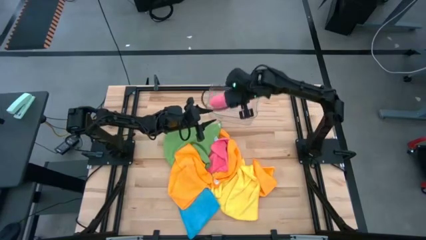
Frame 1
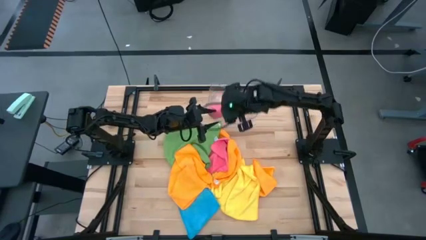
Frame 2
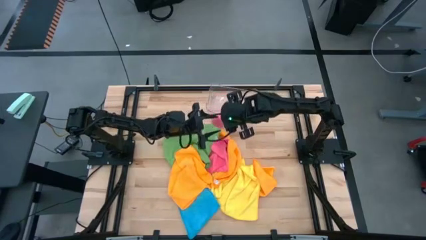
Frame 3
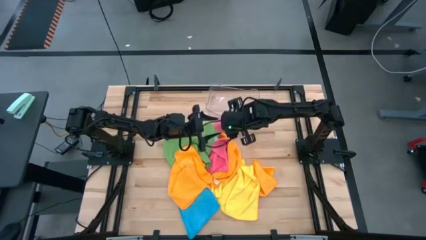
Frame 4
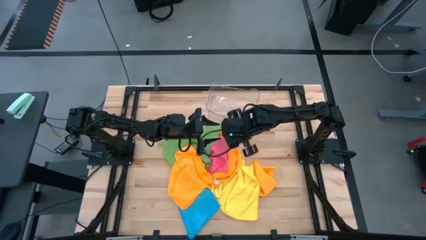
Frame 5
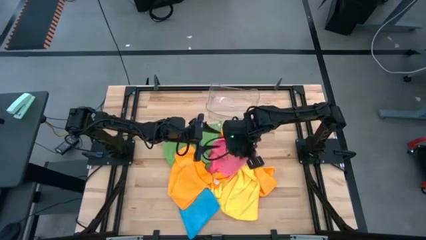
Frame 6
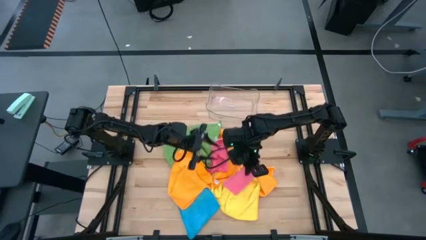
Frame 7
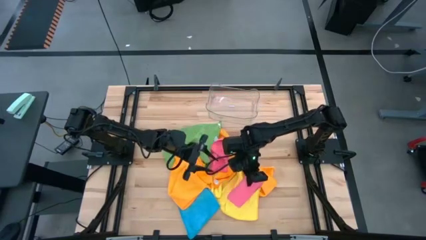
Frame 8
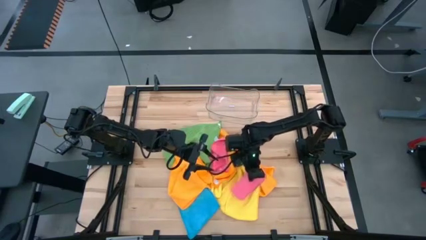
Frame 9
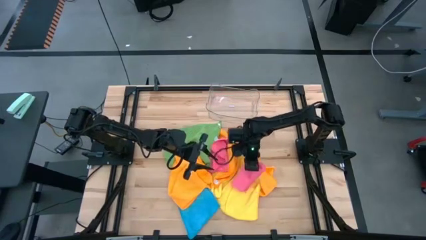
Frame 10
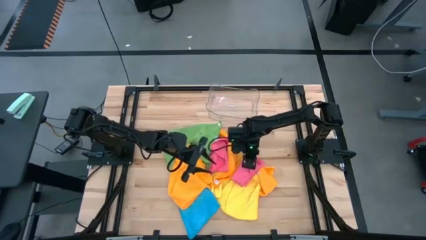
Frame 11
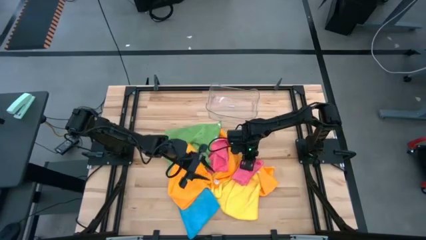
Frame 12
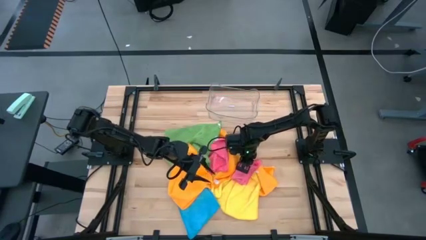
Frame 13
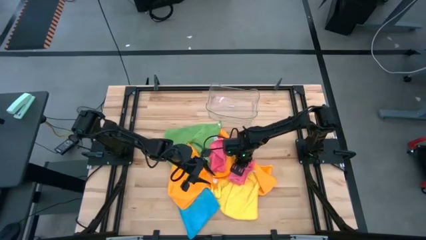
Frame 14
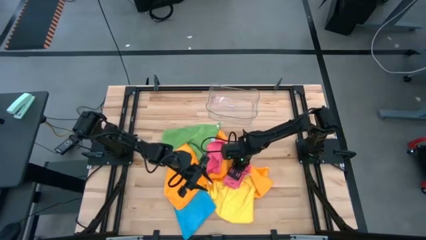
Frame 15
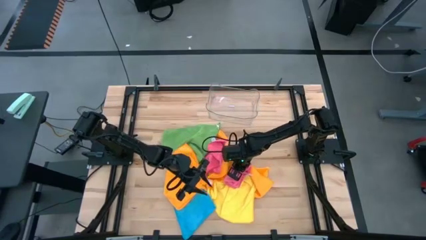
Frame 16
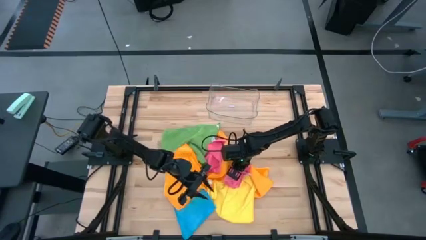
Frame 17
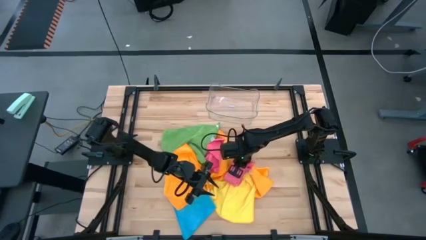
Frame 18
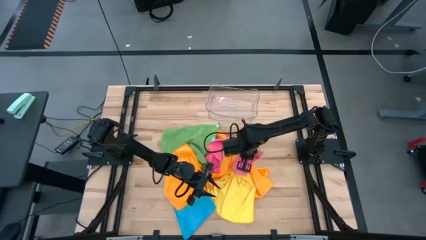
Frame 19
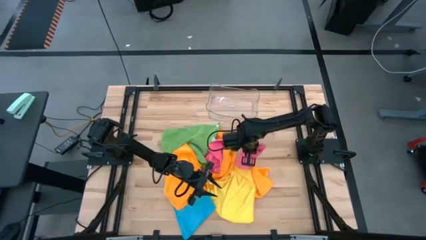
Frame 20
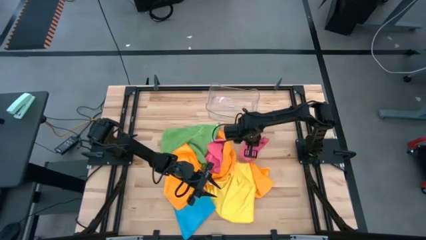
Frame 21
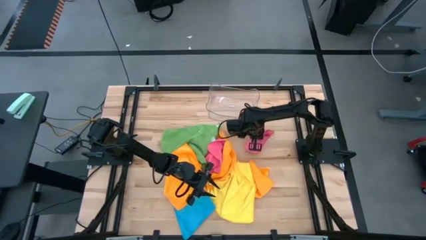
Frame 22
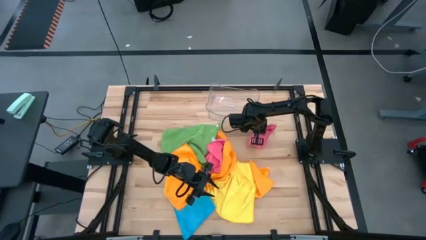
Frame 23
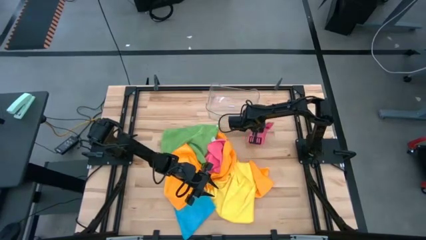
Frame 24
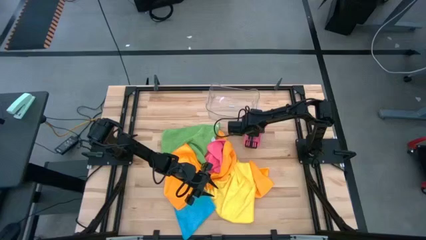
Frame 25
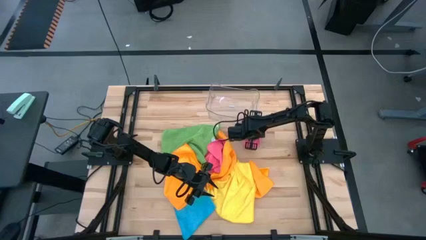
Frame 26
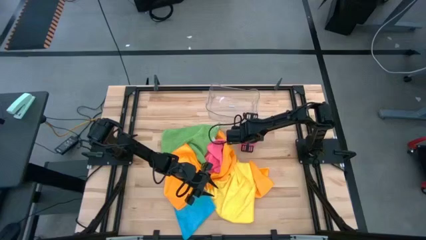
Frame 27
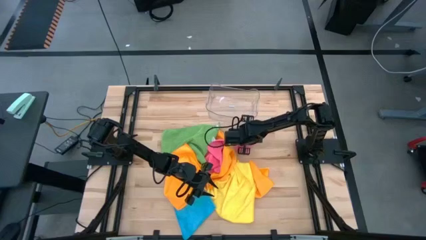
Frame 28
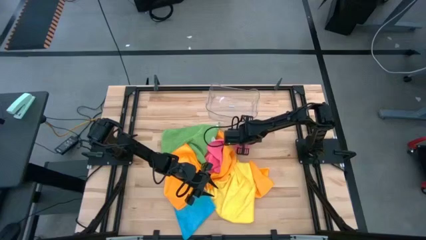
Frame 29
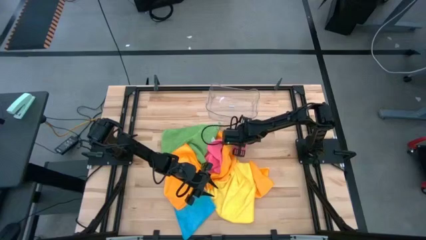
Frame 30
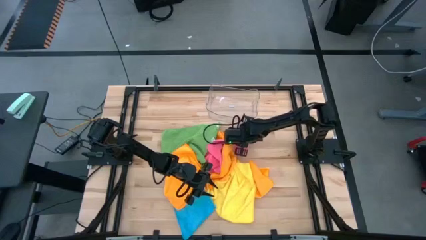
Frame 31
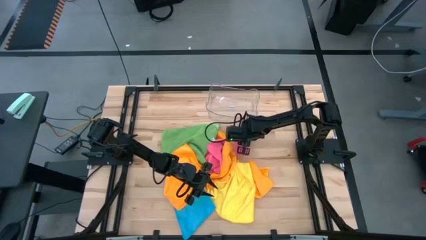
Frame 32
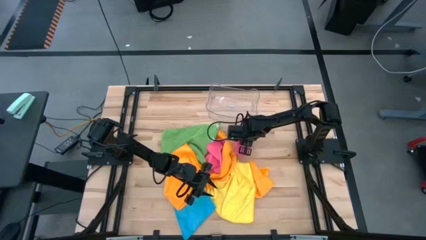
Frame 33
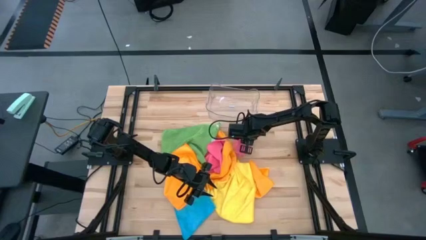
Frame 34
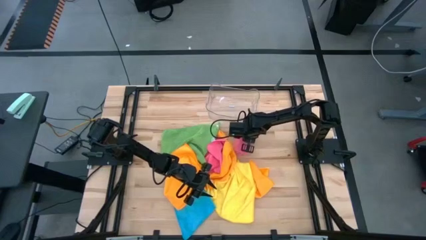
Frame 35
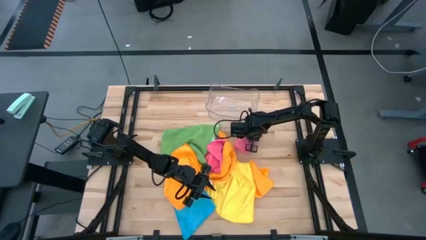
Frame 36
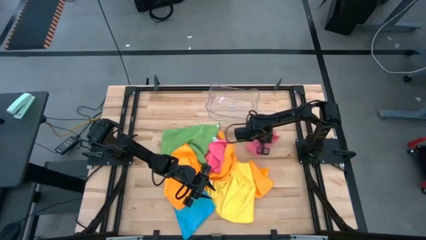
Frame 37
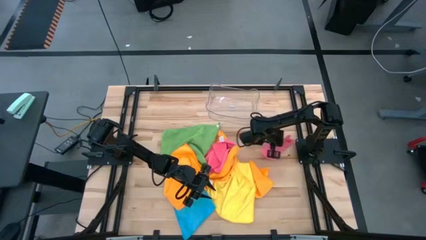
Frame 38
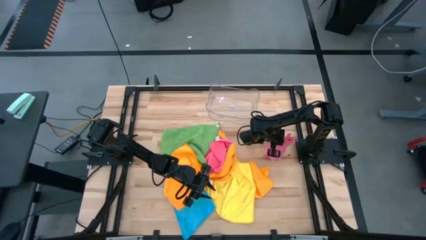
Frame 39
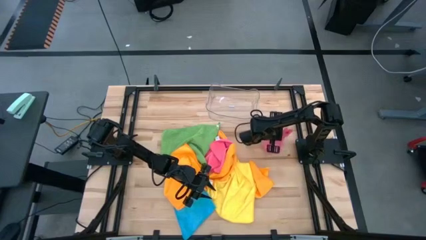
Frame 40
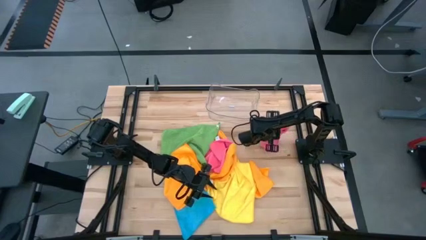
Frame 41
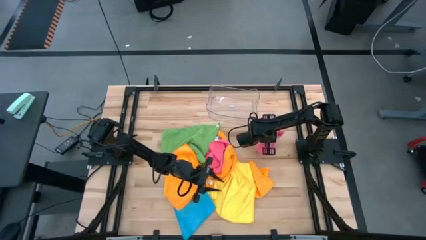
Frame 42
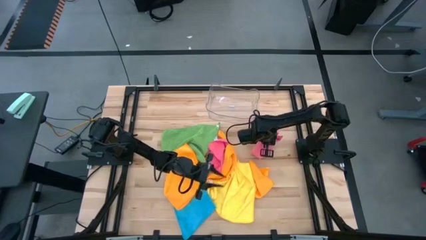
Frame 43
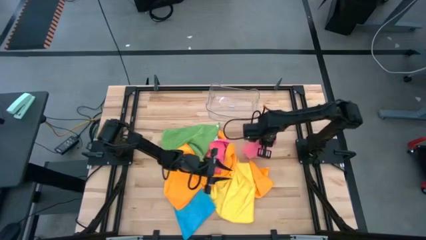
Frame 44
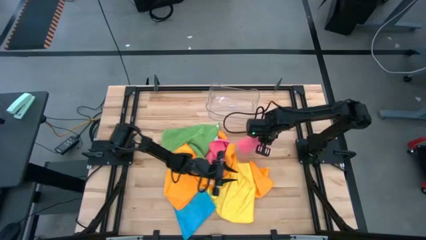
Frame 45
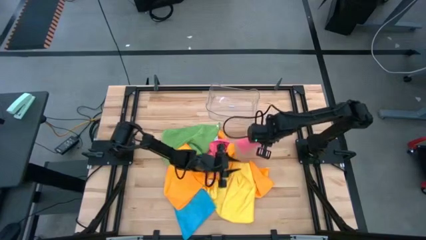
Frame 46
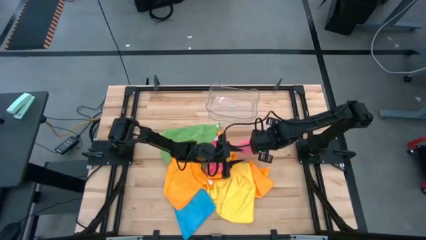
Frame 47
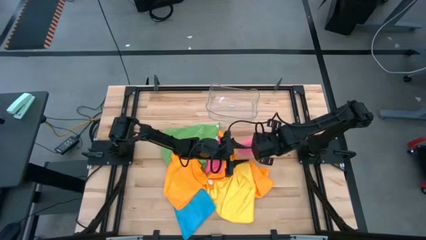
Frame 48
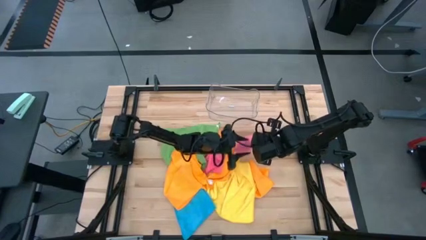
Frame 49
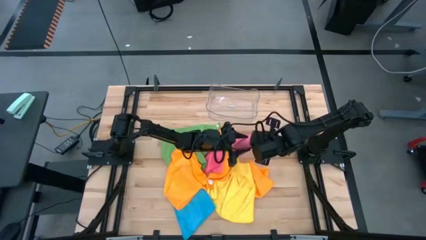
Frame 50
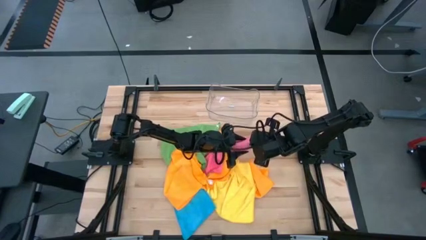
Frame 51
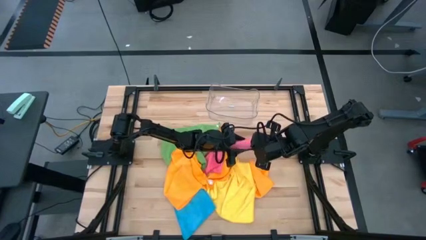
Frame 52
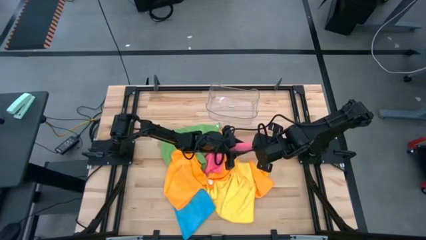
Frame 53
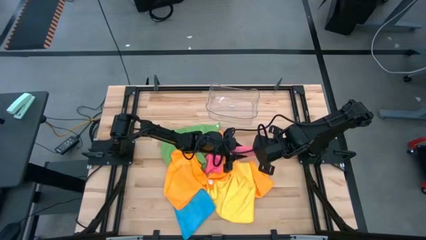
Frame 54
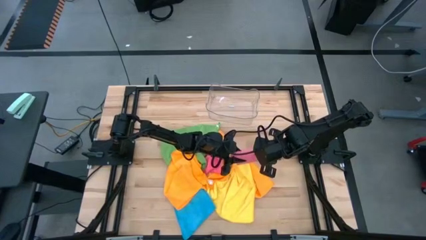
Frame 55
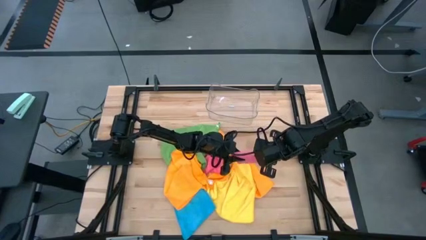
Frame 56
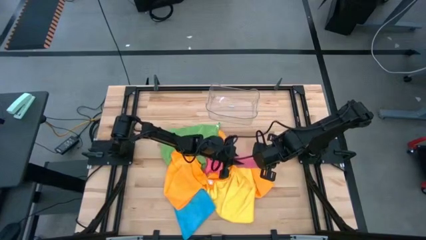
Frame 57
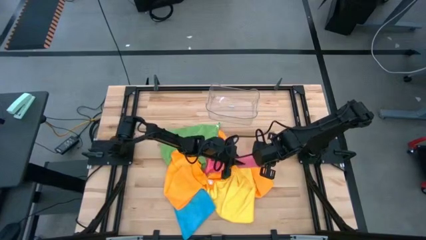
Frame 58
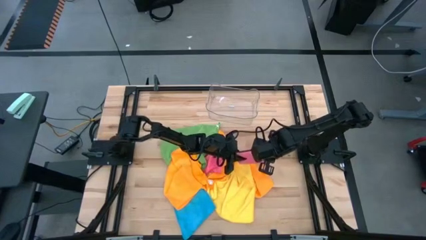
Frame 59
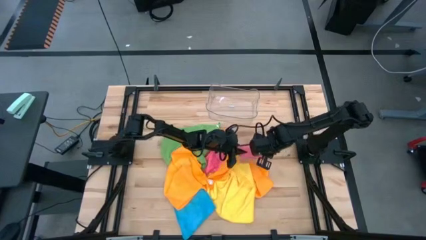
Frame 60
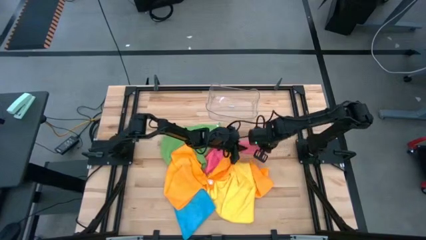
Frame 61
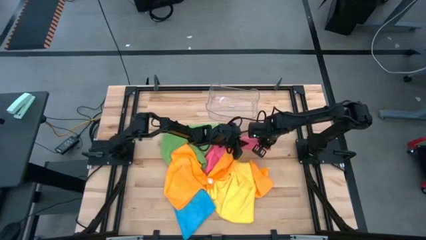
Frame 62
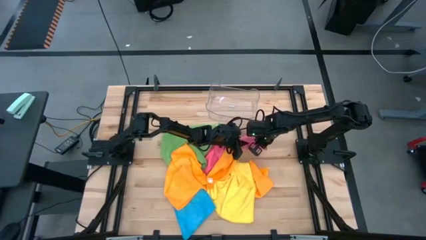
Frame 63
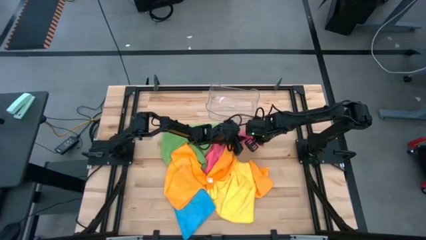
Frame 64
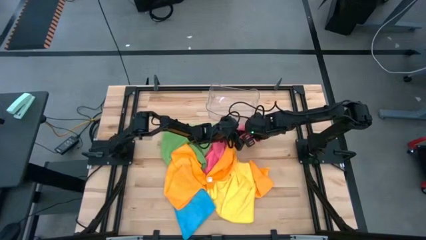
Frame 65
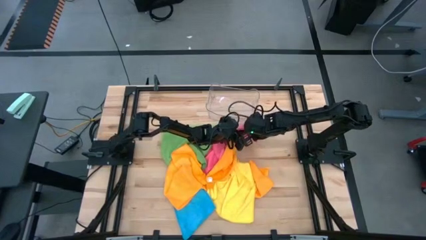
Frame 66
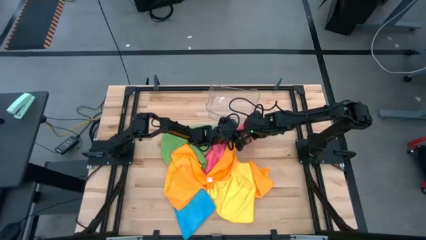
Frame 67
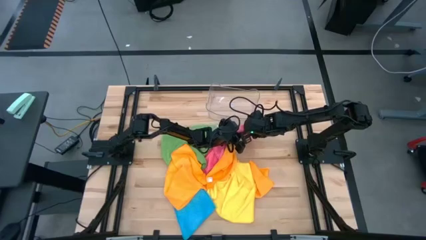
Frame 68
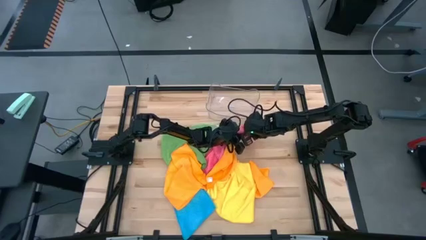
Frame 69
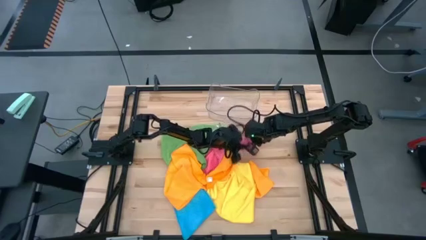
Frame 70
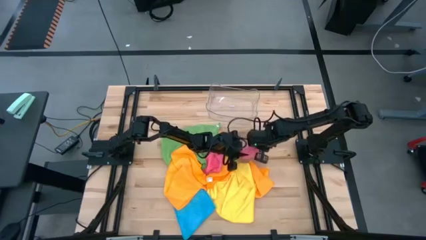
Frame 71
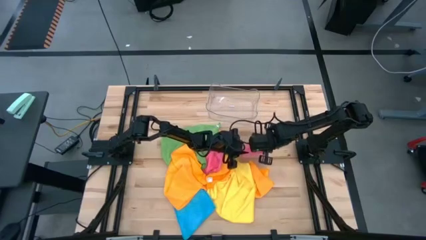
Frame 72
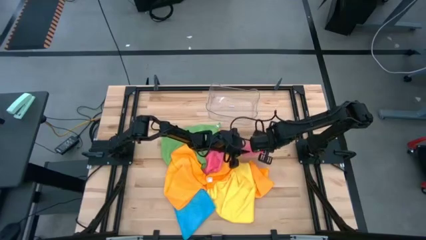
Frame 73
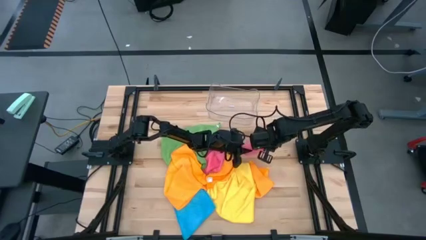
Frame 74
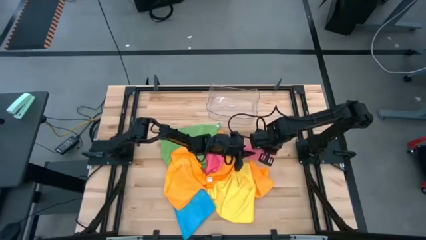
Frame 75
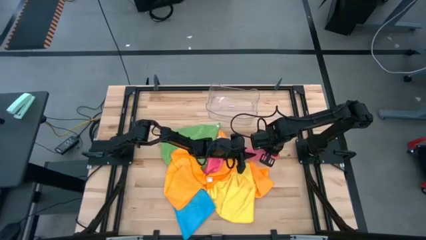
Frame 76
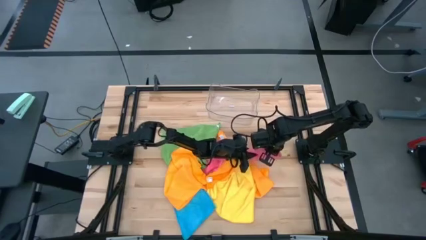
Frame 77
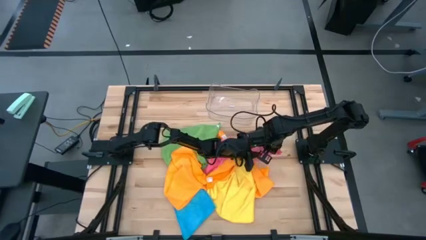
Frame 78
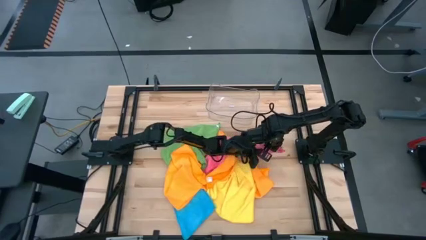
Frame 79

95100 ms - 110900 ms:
Task: Fold microfiber towels
Fold the pink microfiber cloth
